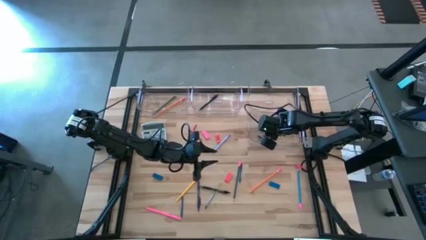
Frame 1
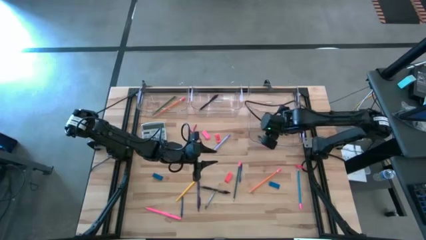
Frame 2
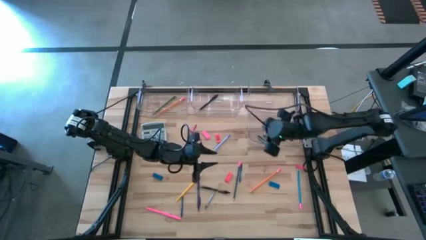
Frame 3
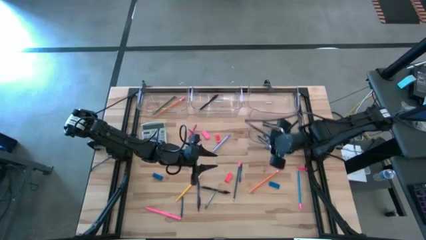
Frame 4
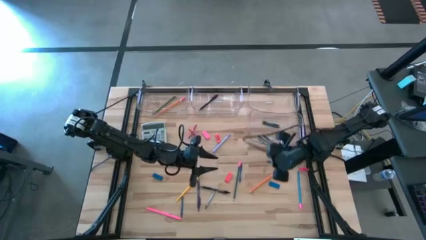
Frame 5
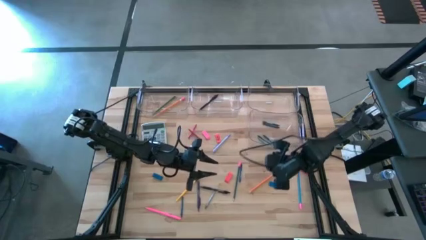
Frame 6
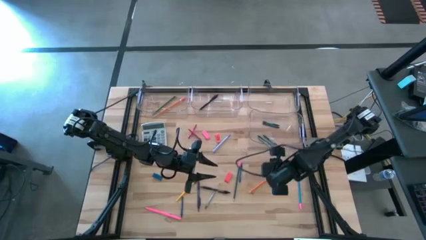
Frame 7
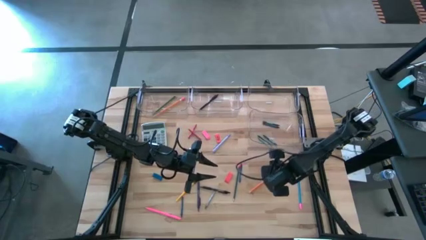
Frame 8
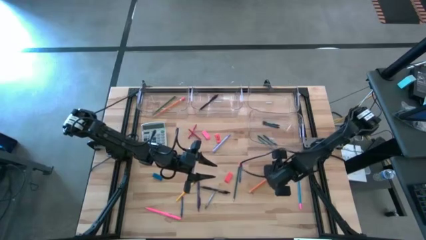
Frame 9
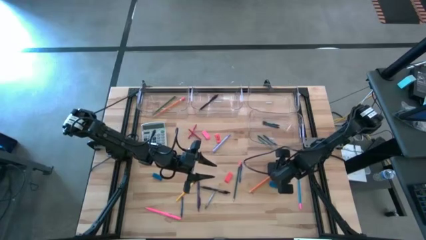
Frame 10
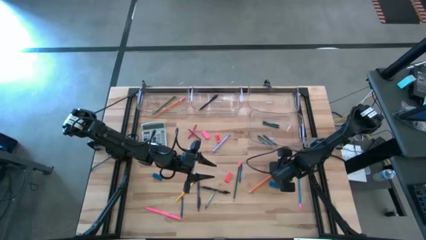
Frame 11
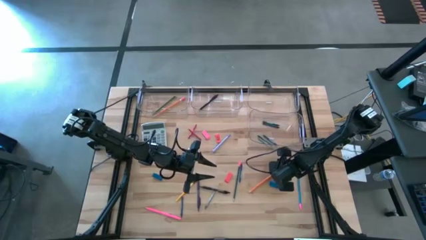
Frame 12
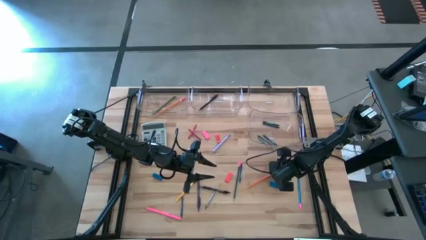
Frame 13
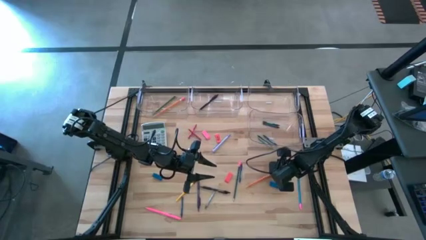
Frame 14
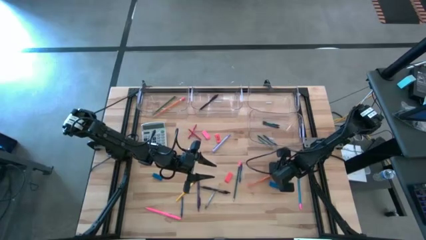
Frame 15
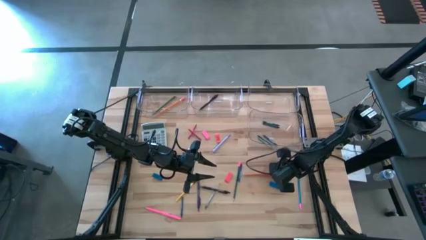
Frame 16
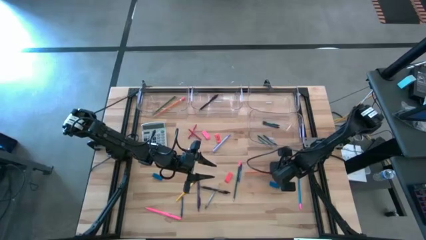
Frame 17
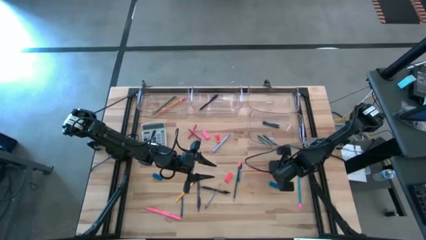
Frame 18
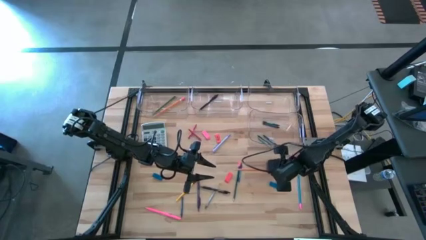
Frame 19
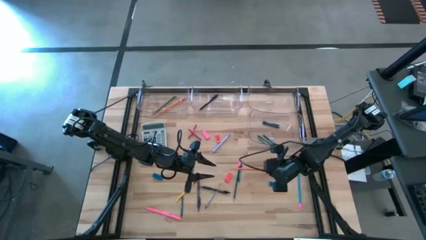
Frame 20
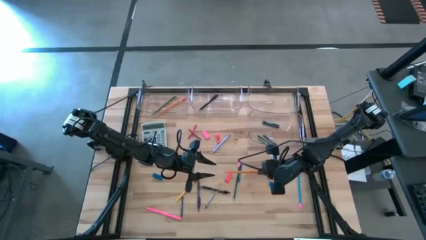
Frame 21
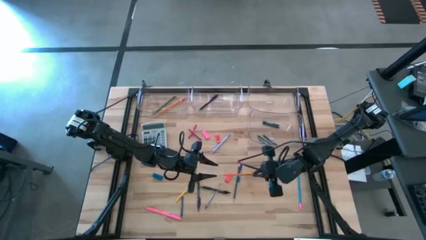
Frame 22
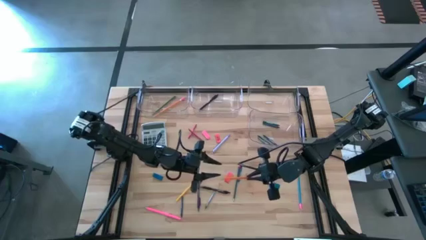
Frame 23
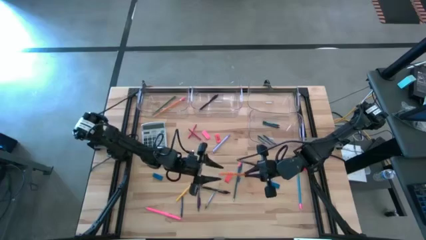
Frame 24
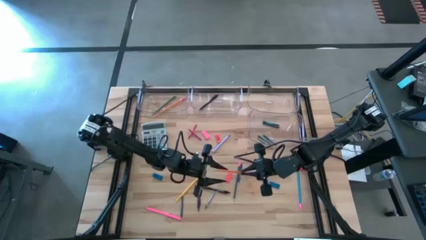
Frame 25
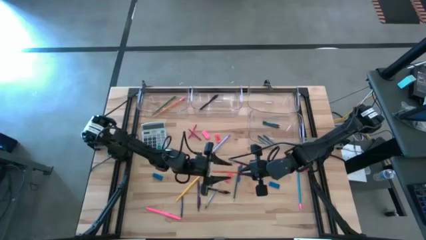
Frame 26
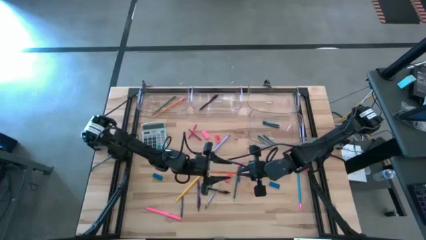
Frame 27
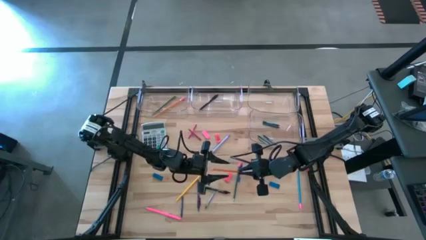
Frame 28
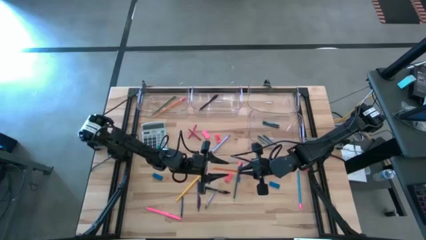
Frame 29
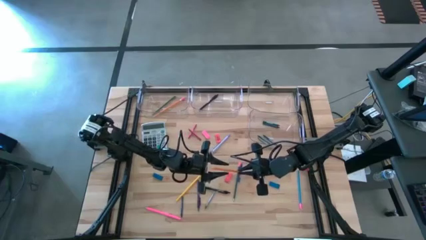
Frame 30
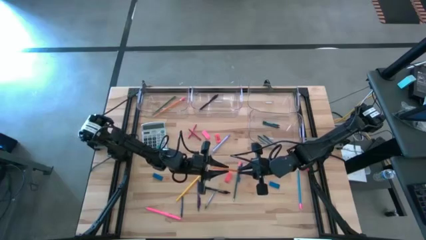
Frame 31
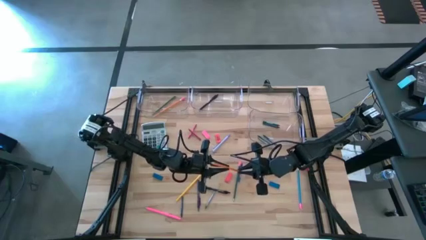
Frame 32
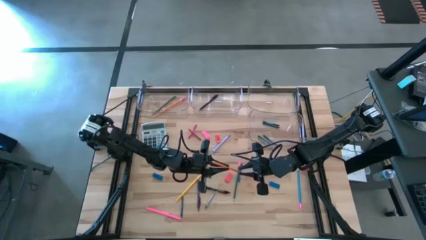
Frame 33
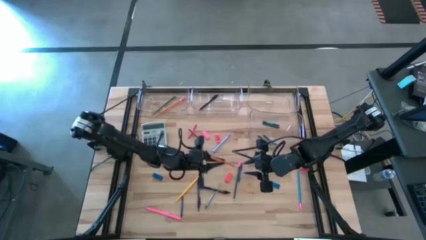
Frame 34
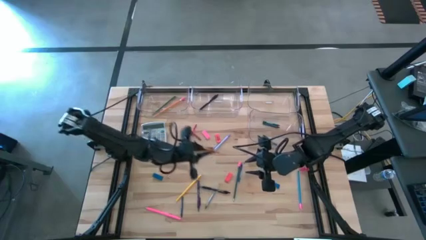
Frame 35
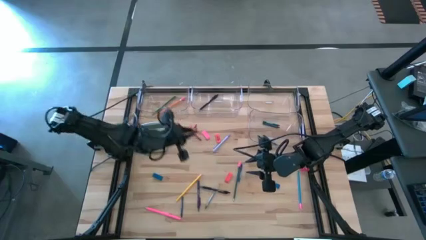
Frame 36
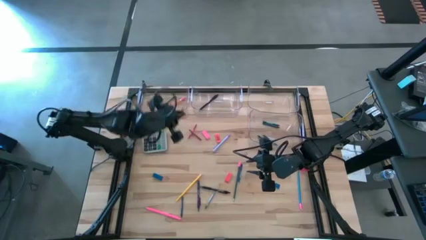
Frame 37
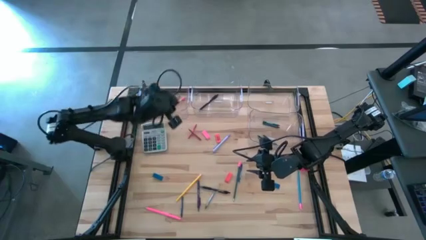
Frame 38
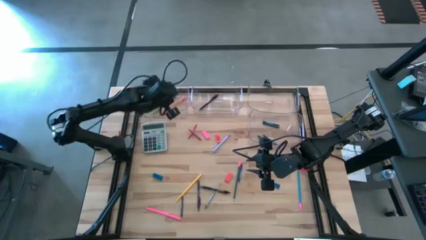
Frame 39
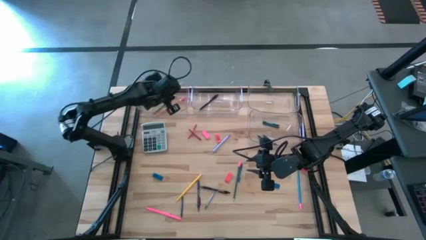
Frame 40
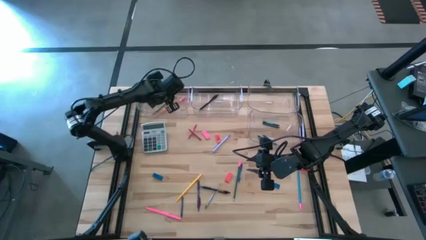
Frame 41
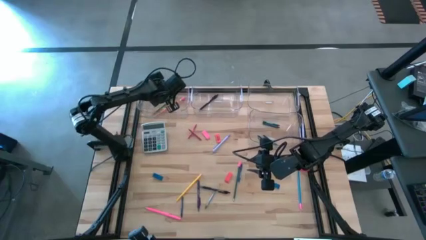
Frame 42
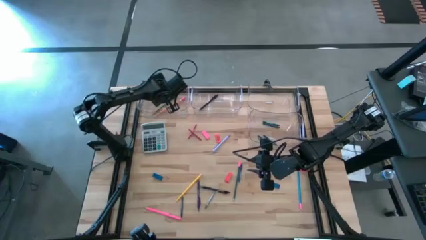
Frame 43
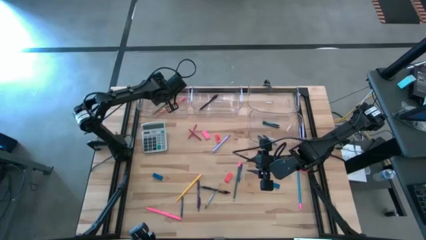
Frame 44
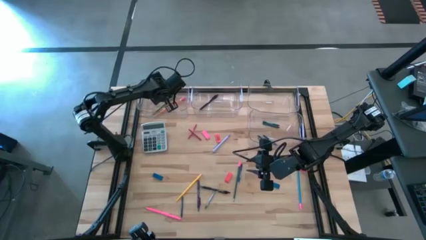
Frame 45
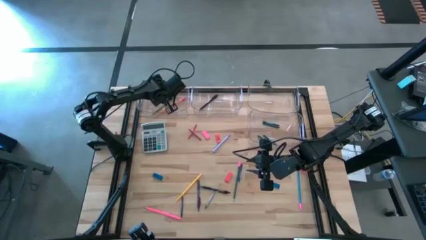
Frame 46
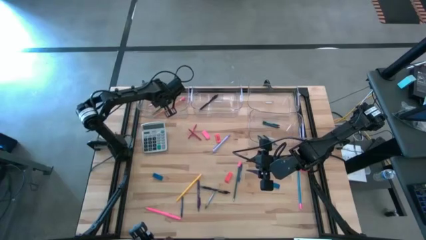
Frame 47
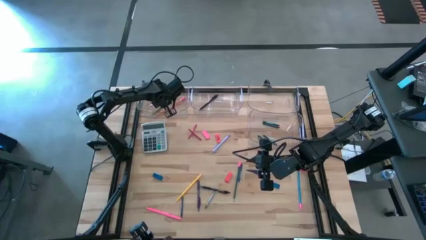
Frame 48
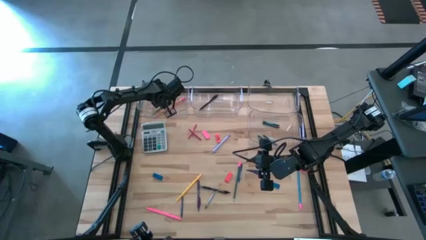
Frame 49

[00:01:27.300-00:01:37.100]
Task: Sort crayons/erasers/pens/pencils in bins
Put the orange pencil into the top left transparent bin

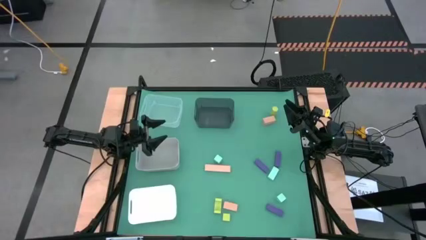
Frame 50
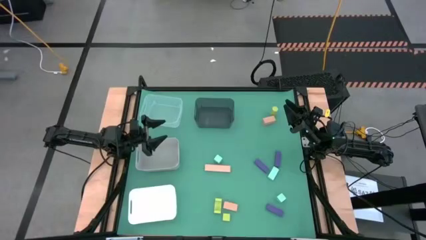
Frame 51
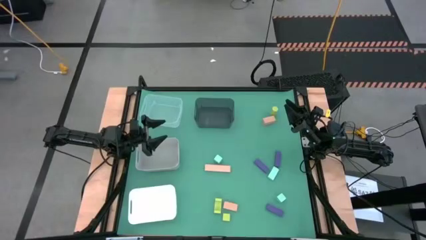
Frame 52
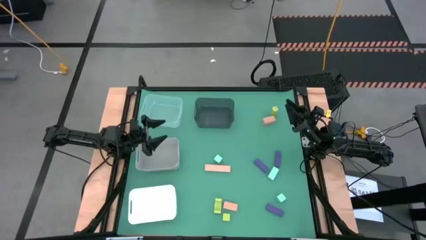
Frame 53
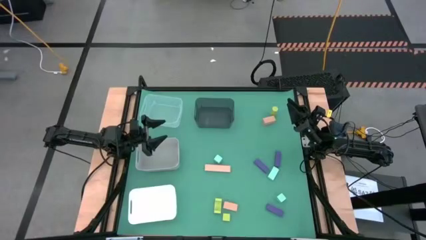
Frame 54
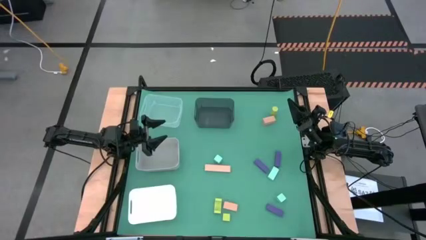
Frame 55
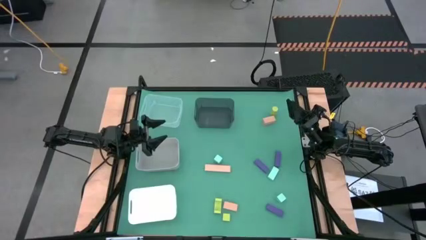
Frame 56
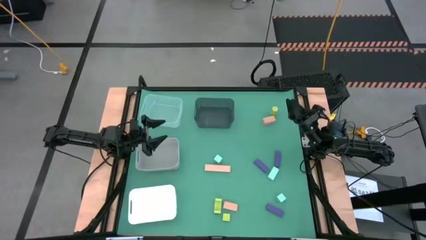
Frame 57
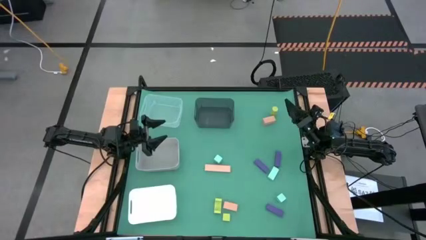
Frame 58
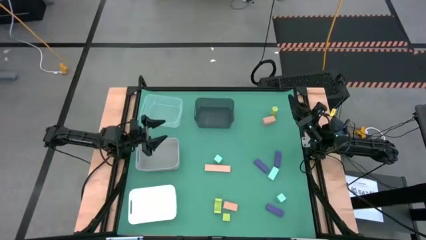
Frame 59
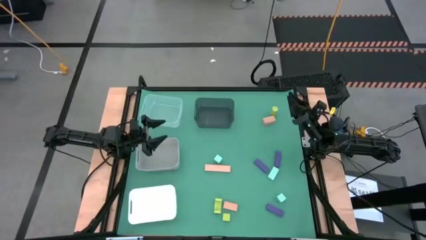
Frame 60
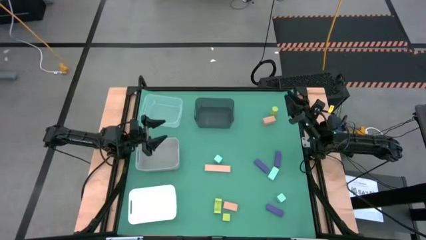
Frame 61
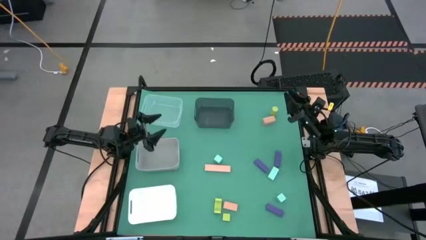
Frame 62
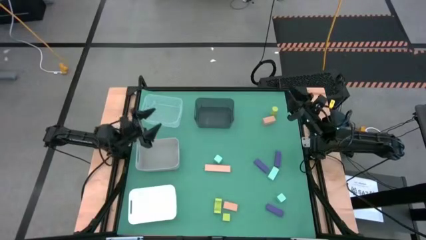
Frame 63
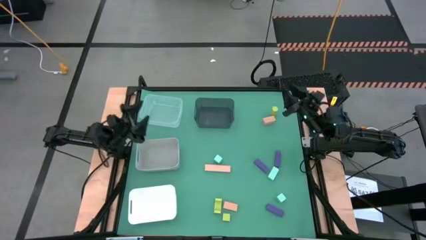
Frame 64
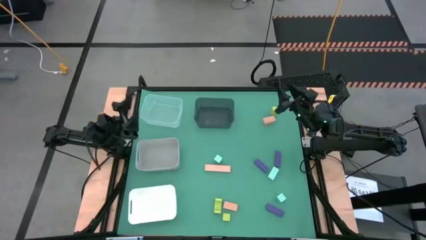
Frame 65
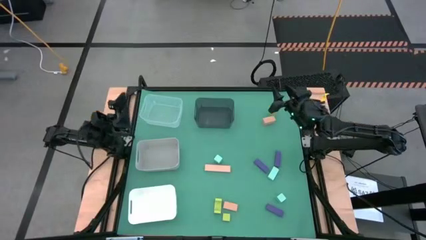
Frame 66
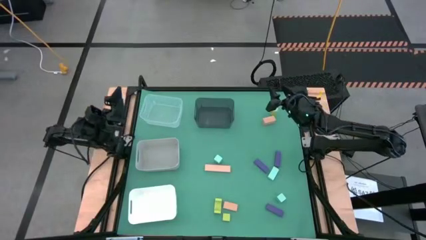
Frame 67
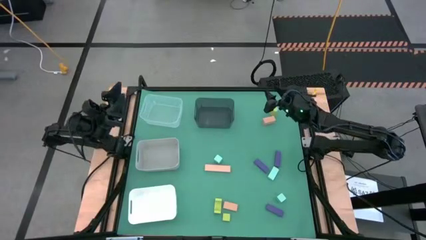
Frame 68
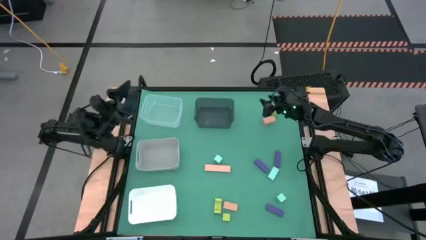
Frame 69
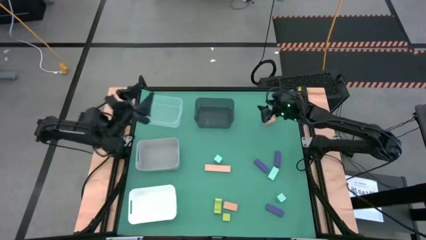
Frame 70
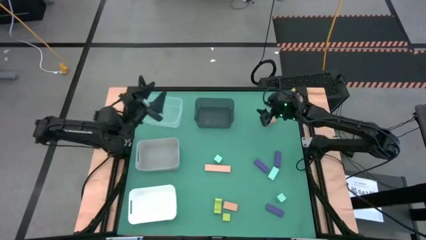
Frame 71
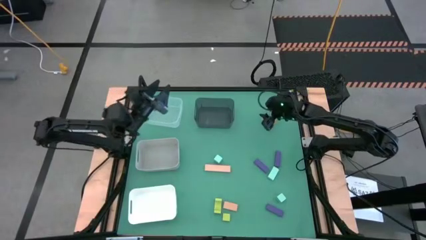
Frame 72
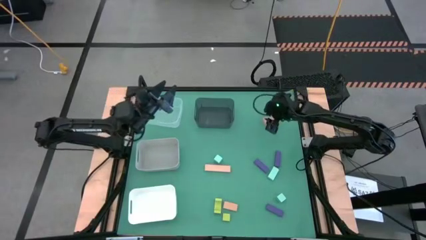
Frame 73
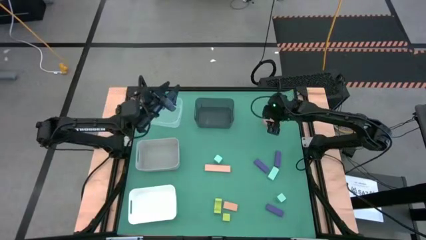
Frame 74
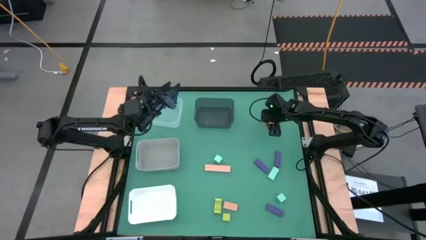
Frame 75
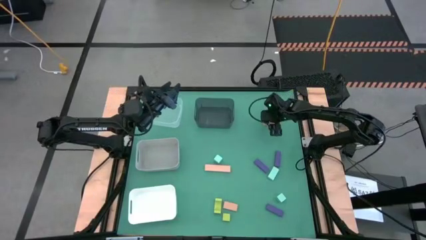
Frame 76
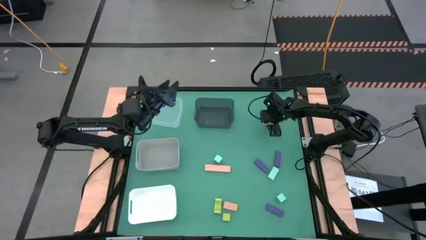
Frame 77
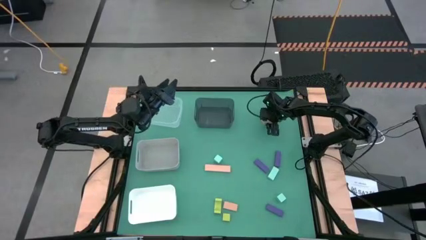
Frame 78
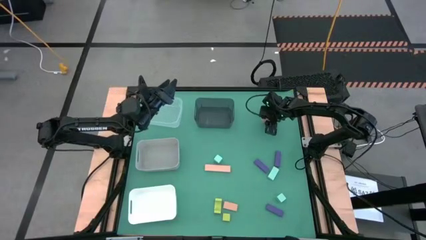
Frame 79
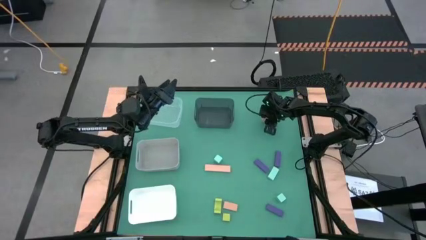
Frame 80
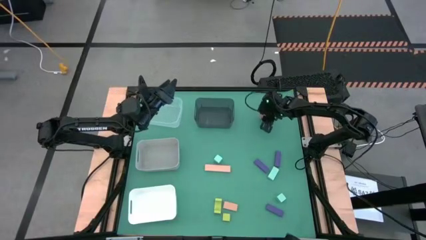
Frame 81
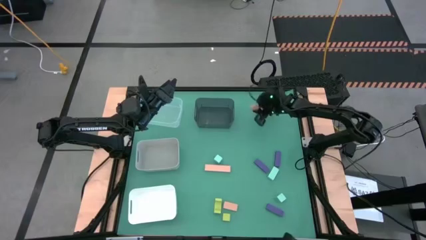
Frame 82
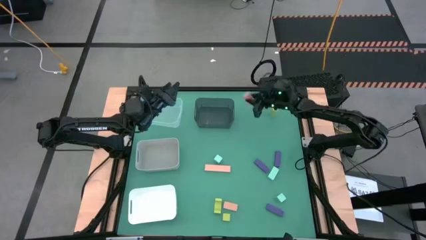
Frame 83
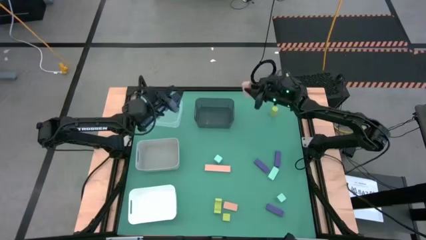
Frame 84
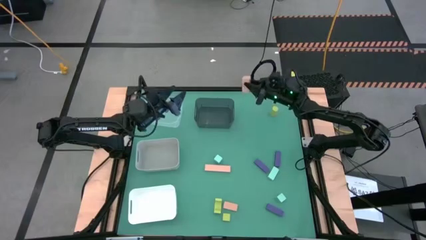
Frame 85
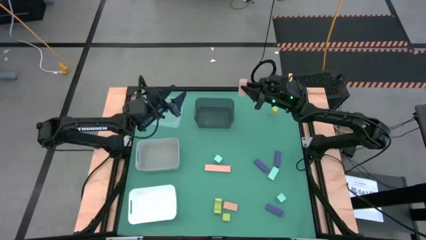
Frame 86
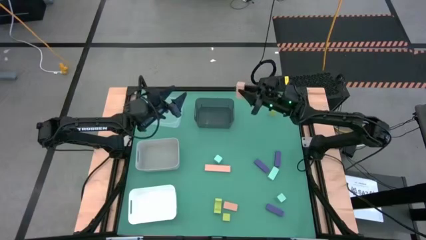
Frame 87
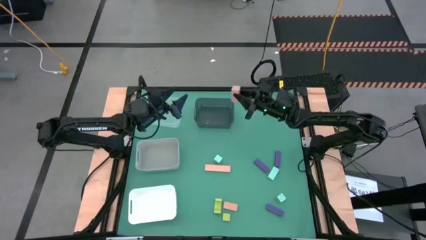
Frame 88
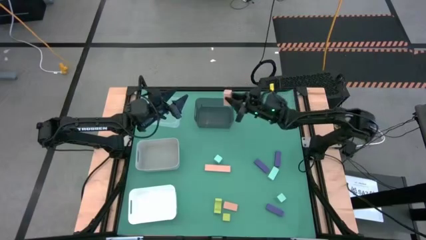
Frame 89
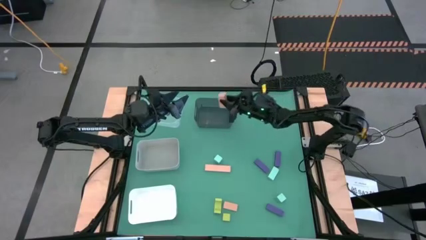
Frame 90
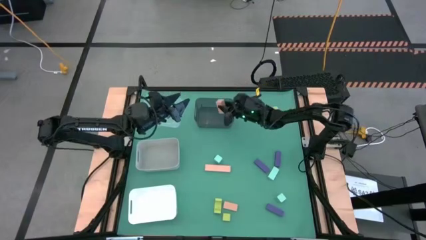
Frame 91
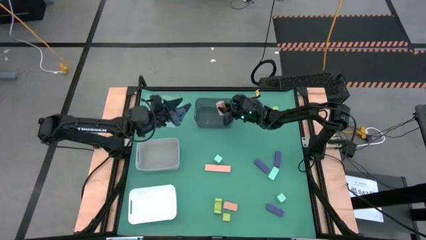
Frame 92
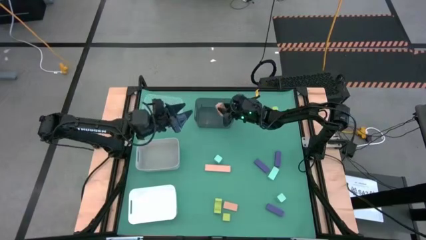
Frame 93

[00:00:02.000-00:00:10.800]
Task: Sort & place blocks by color
Put the top right brown block into the black bin
